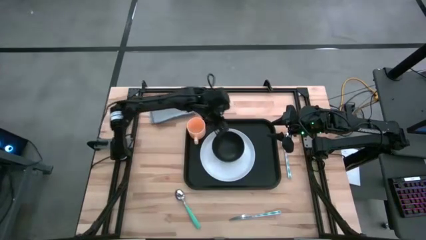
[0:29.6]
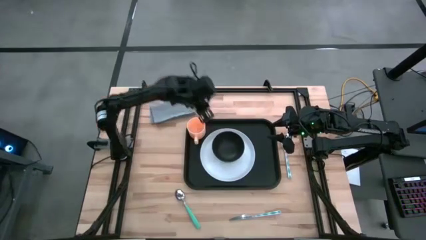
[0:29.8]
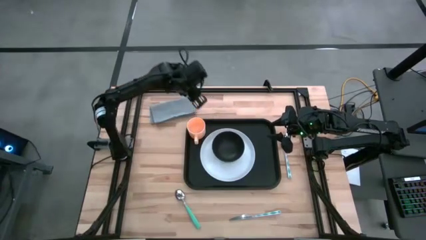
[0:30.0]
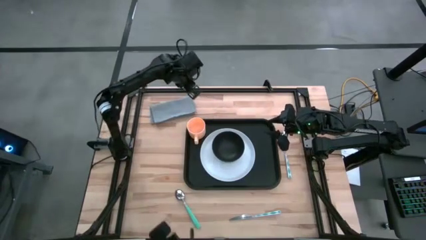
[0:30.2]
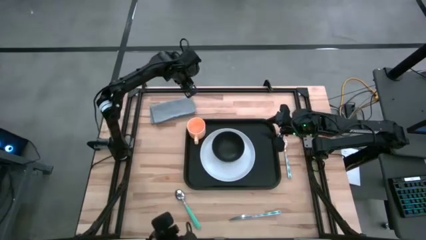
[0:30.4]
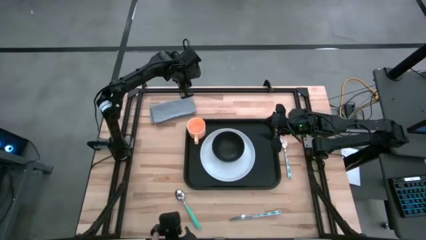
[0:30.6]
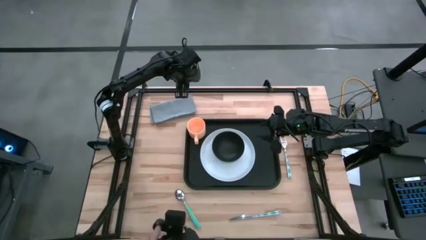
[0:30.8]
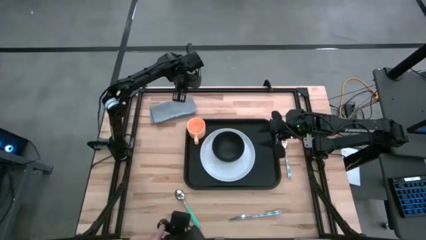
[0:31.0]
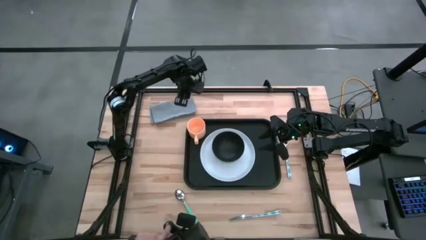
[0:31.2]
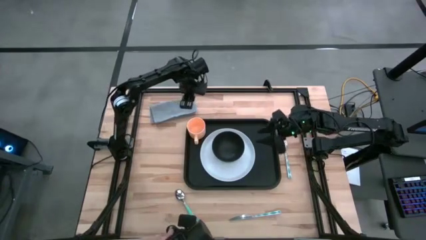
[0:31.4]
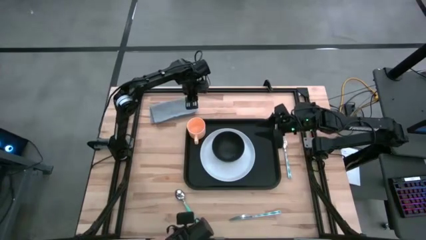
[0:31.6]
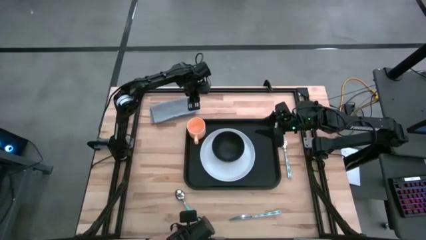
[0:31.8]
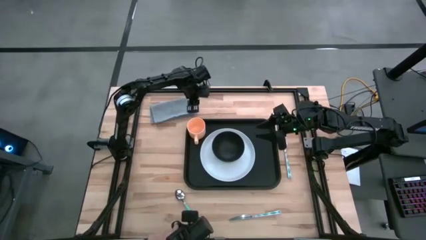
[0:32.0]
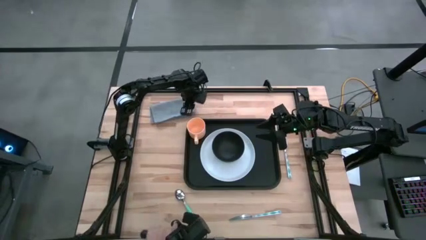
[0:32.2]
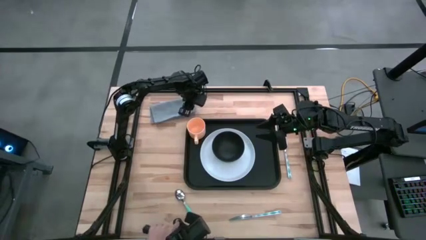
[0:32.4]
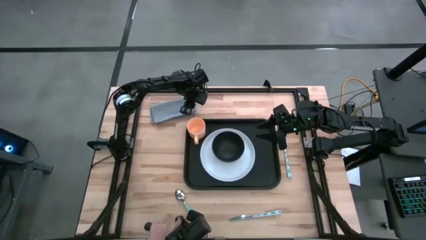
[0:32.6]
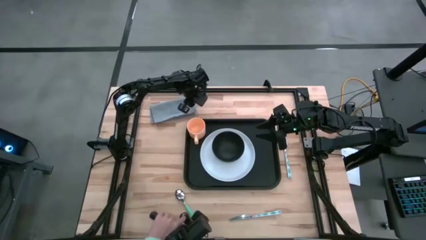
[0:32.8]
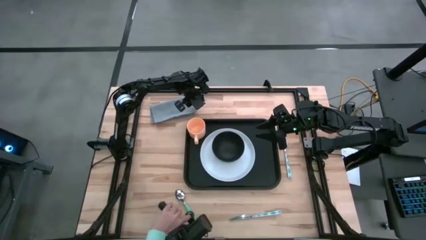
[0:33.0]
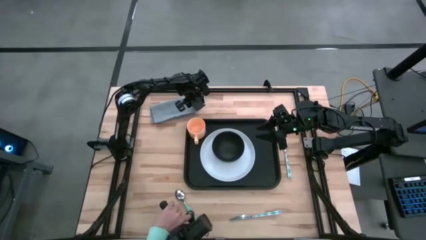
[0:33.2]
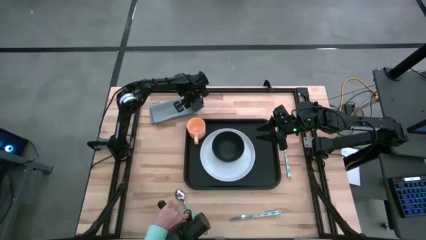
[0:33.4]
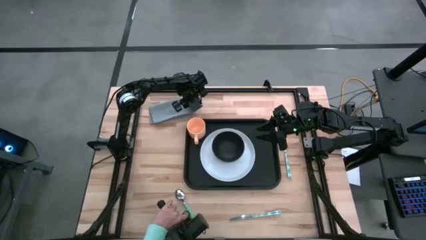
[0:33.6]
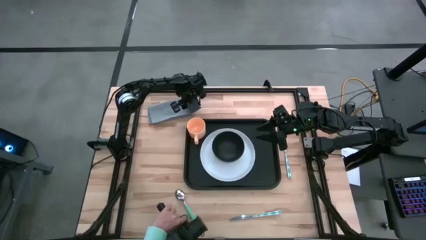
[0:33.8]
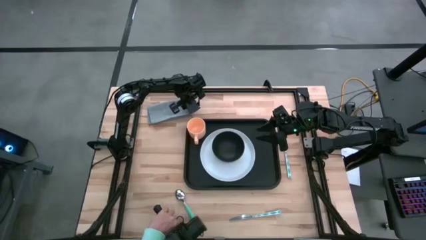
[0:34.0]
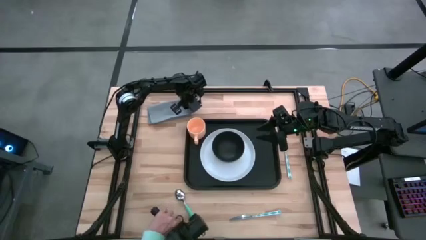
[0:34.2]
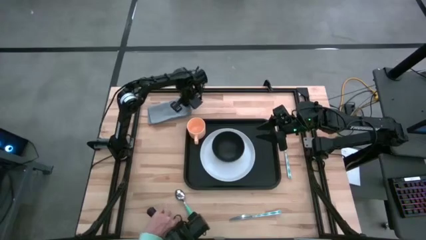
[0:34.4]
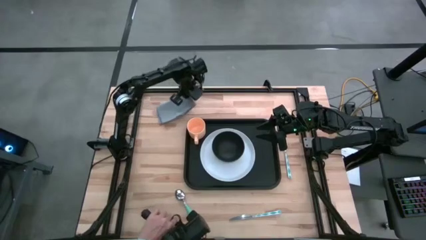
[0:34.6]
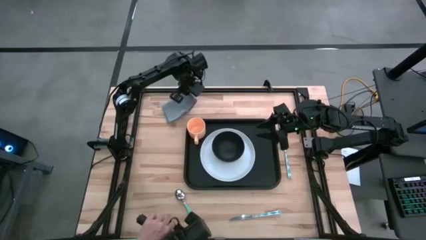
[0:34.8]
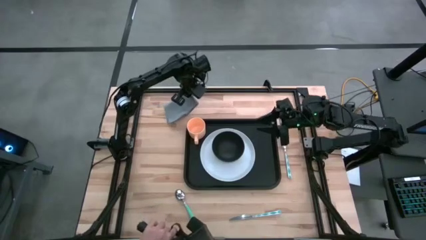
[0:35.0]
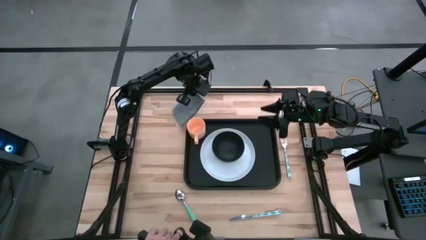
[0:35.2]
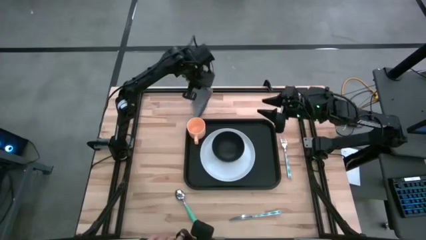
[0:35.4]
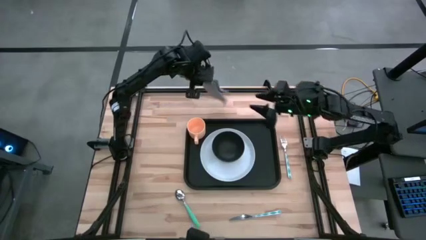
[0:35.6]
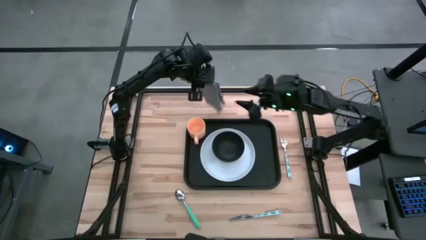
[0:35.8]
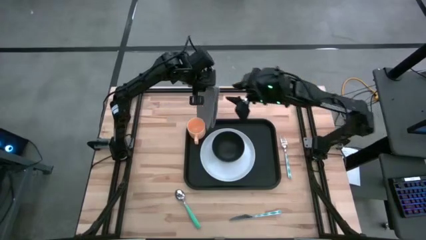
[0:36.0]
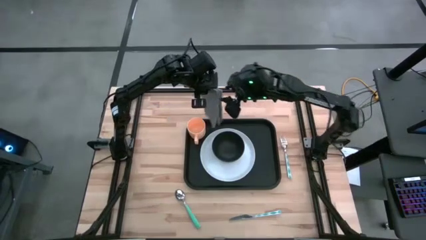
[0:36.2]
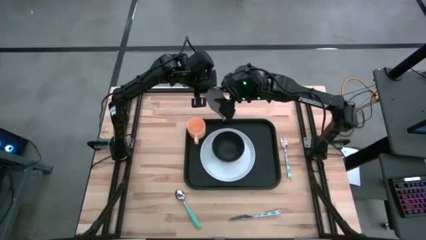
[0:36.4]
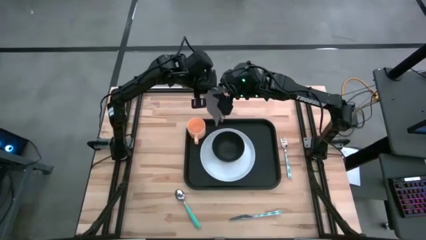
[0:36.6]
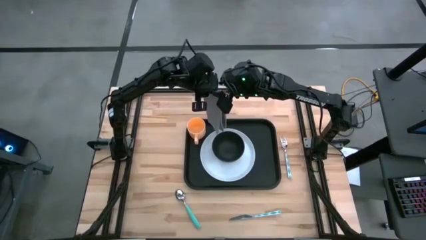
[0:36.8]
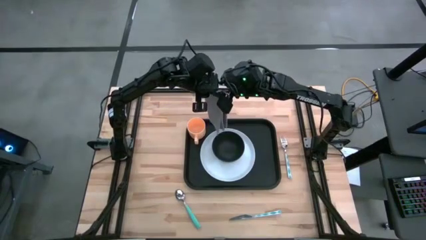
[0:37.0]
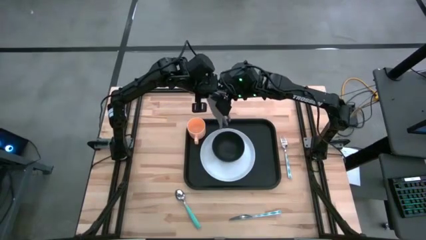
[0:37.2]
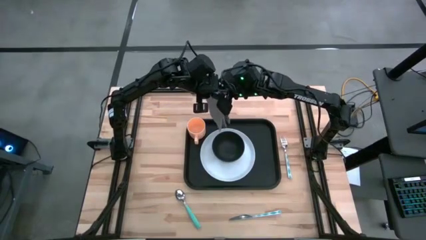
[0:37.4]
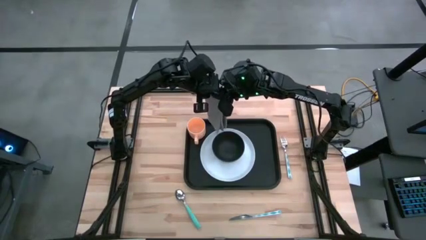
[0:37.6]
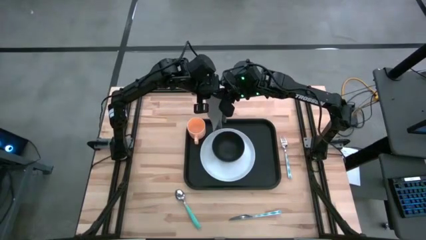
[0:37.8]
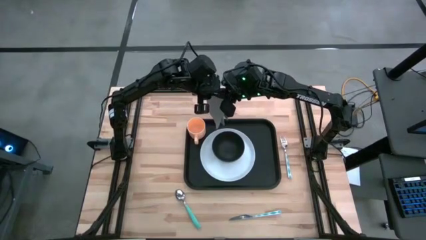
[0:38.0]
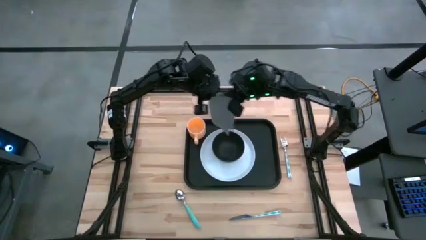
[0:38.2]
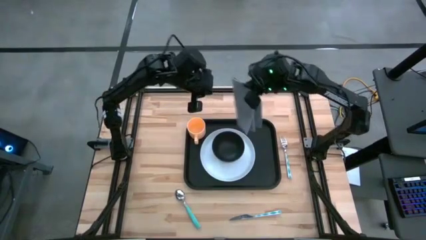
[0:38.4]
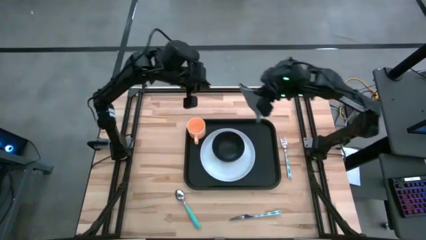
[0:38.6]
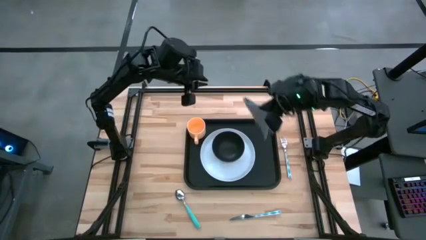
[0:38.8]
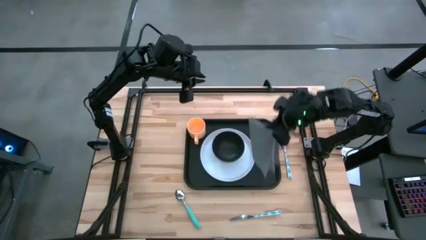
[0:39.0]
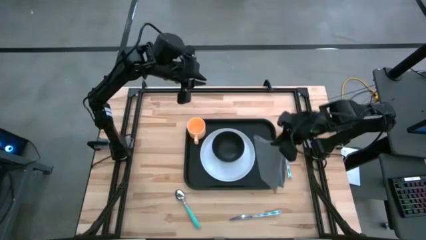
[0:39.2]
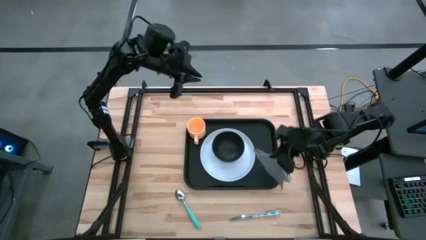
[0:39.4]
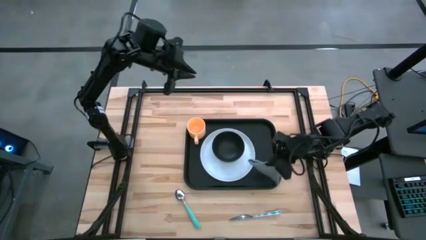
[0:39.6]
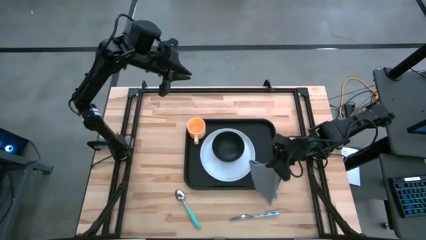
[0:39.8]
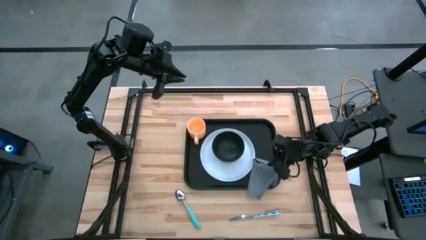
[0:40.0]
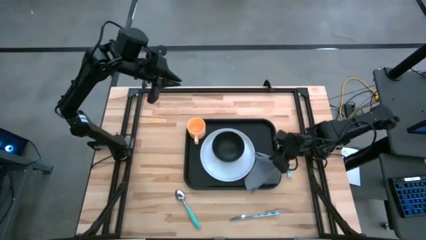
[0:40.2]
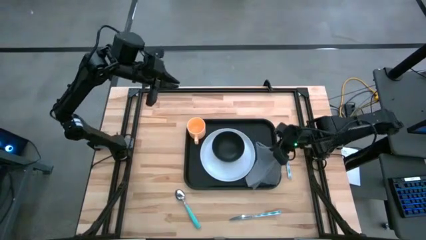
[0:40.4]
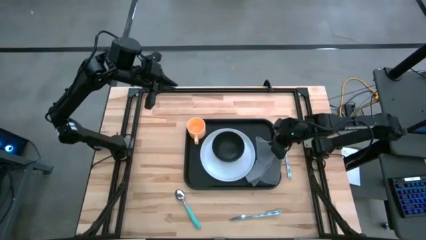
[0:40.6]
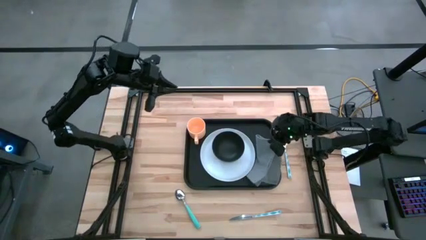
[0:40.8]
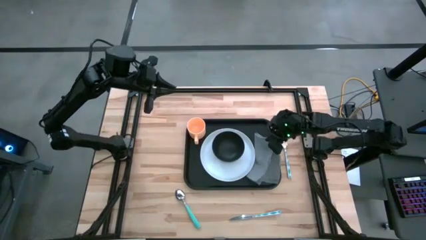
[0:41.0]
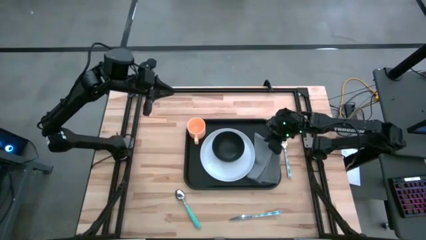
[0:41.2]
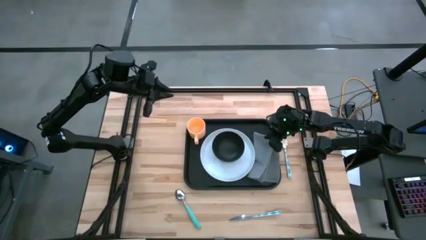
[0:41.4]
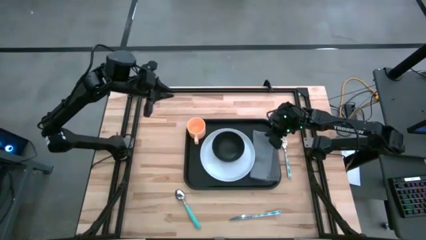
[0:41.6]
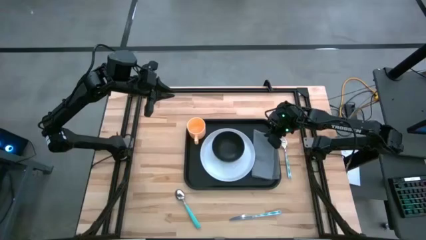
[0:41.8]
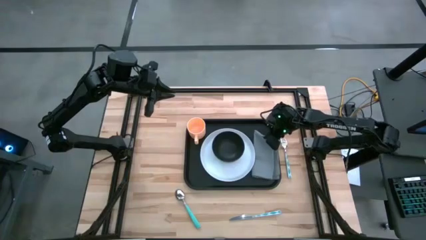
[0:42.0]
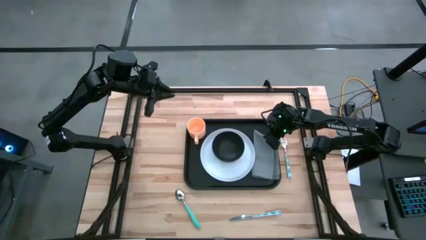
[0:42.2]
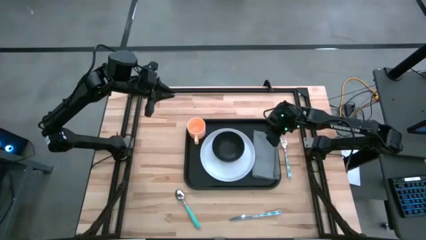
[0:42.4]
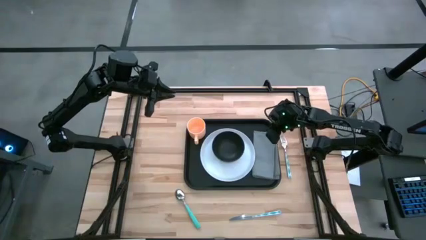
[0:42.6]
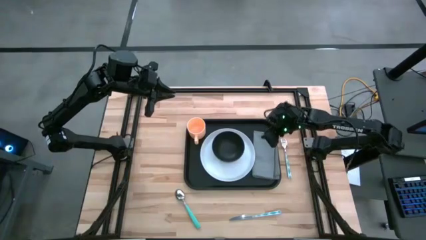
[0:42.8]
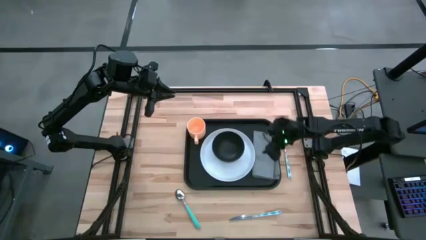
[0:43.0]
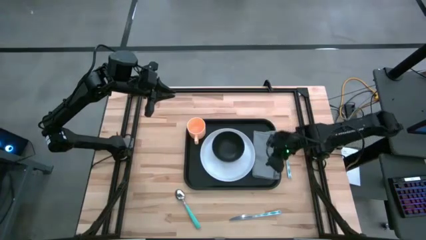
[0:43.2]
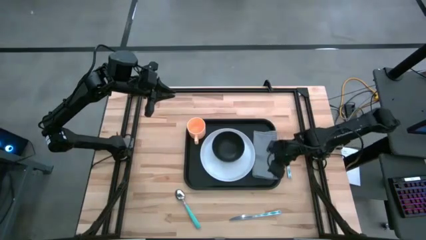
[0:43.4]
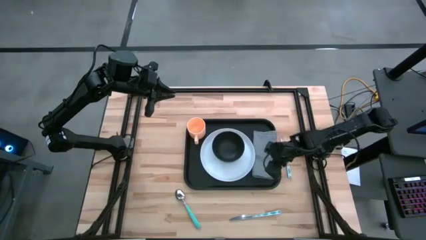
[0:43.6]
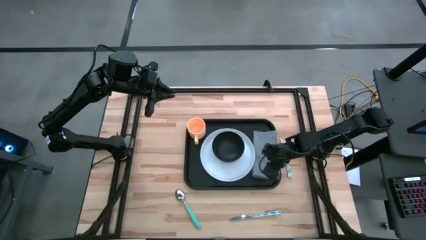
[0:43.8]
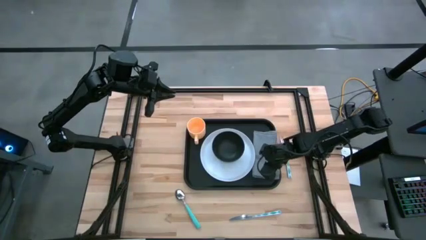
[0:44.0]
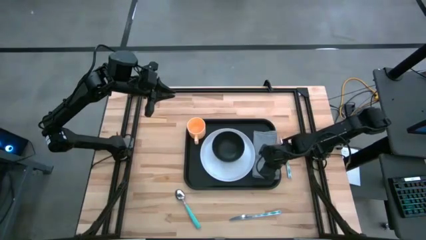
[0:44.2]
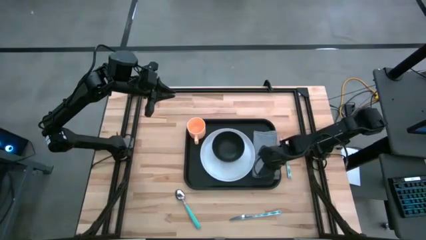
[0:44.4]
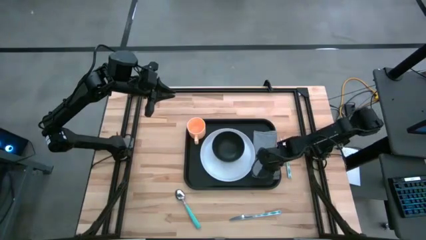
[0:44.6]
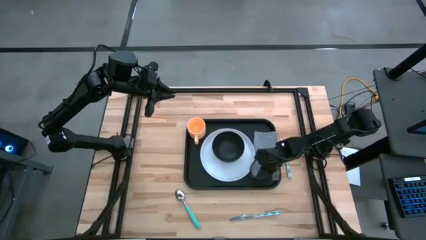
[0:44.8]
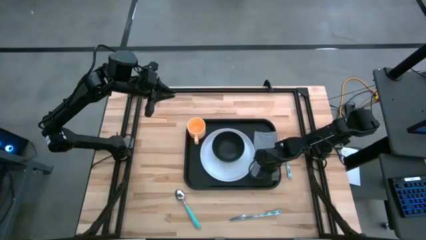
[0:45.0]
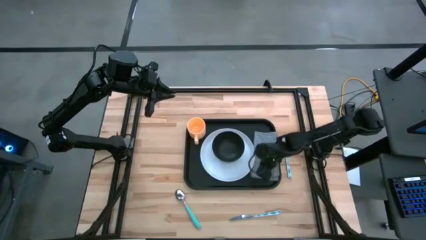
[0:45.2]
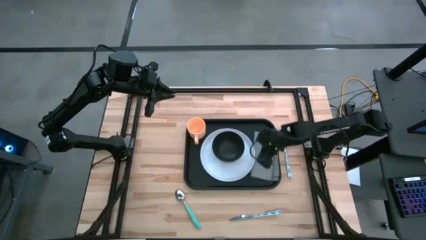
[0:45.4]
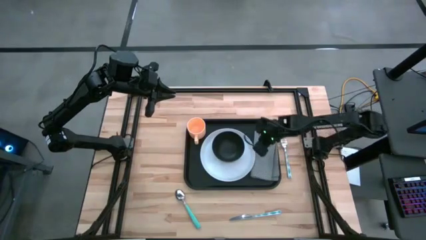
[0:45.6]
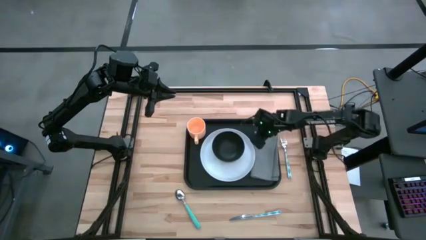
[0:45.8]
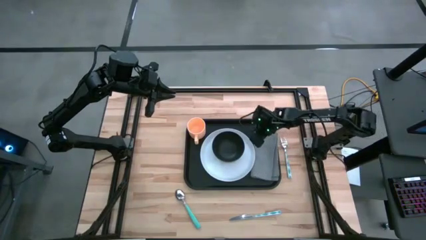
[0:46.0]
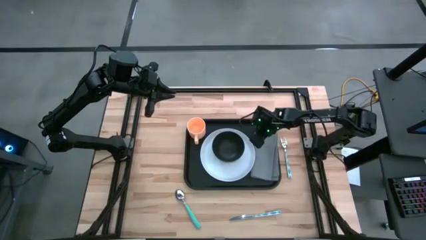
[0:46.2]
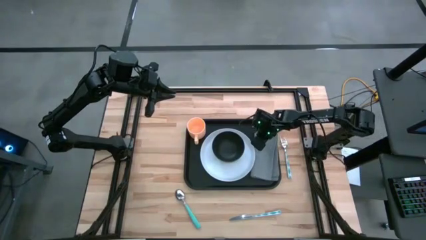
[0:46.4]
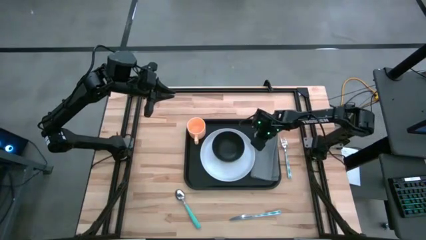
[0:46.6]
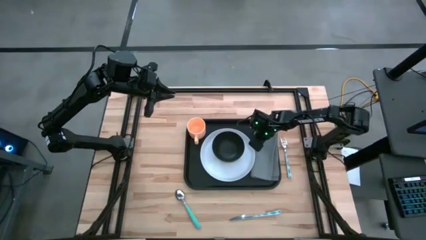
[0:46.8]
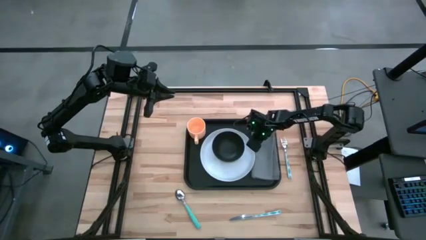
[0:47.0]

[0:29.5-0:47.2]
Task: Set up tray
Put the gray napkin on the black tray to the right of the white plate
